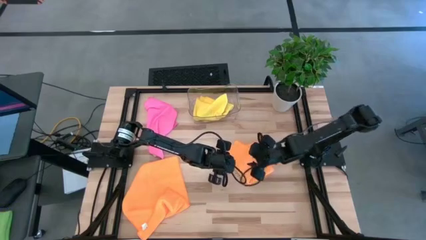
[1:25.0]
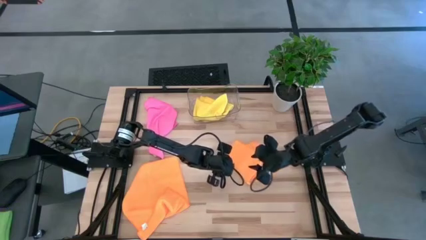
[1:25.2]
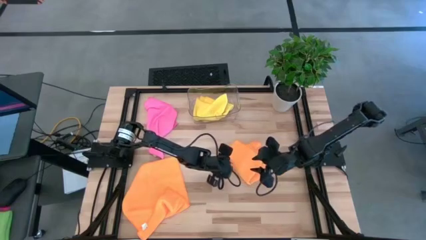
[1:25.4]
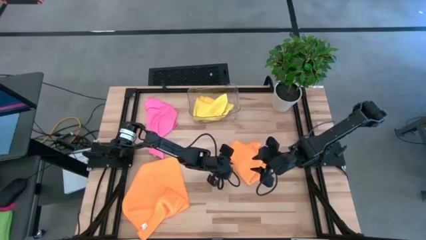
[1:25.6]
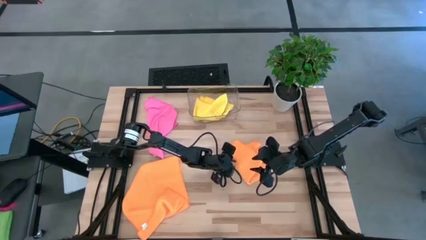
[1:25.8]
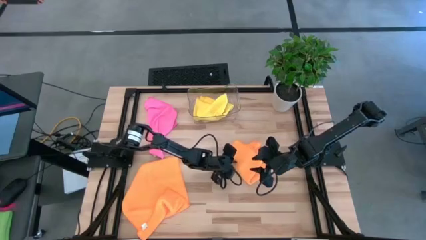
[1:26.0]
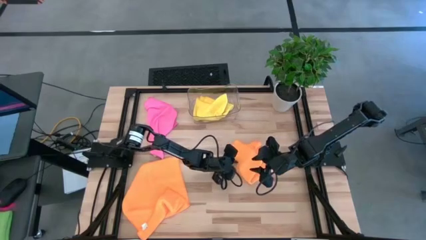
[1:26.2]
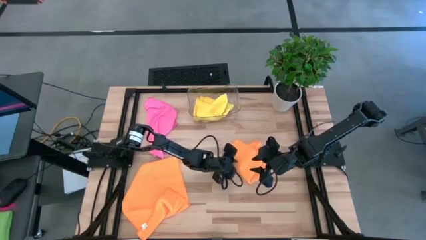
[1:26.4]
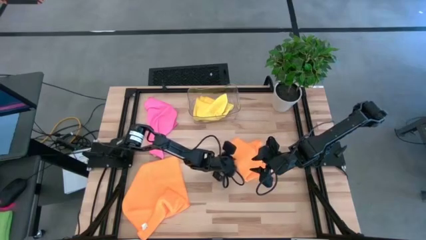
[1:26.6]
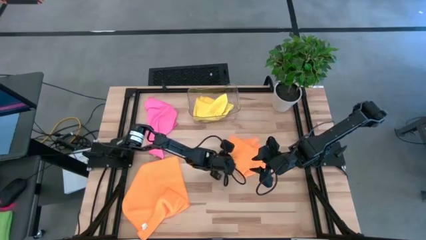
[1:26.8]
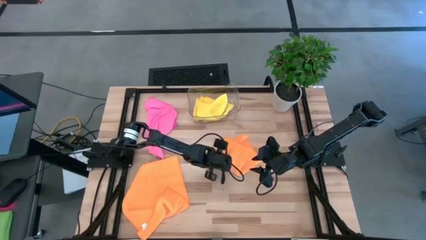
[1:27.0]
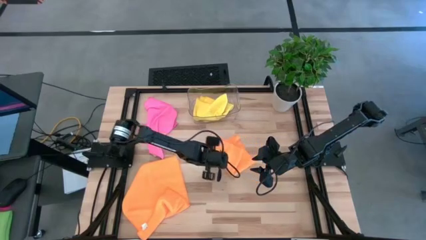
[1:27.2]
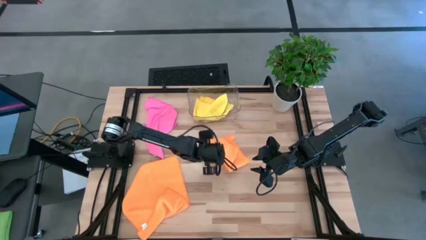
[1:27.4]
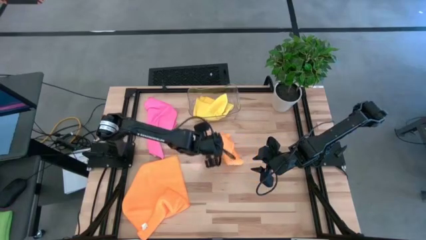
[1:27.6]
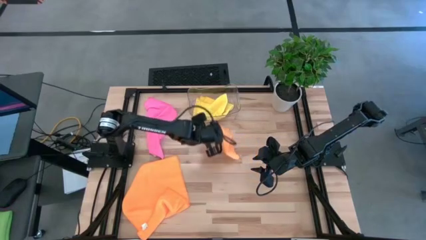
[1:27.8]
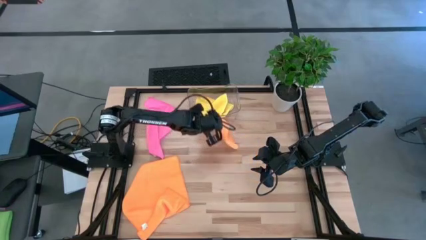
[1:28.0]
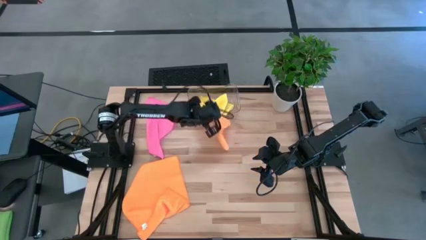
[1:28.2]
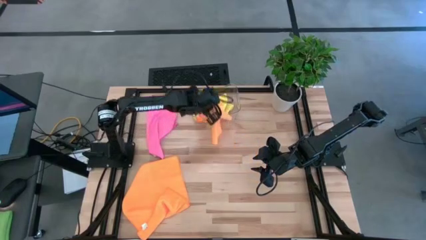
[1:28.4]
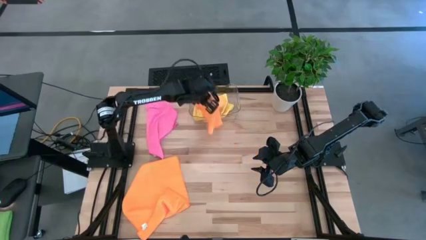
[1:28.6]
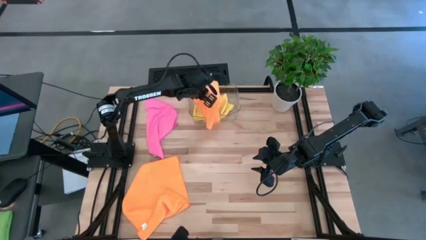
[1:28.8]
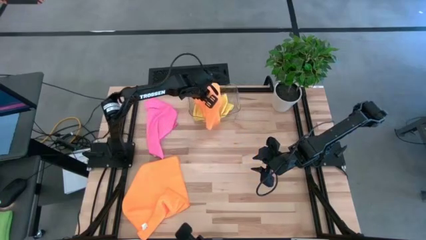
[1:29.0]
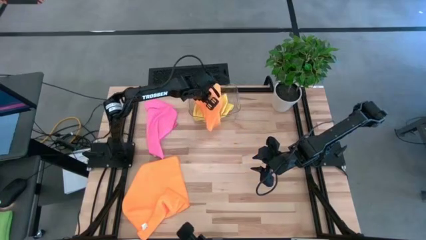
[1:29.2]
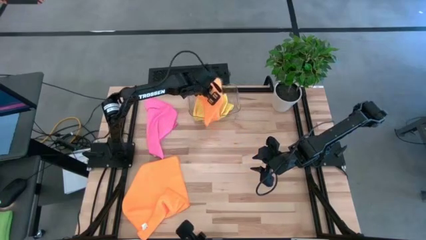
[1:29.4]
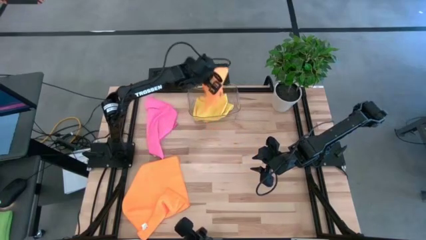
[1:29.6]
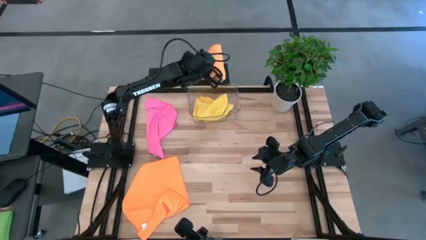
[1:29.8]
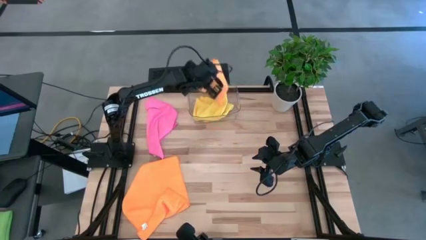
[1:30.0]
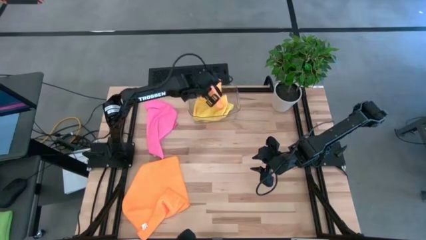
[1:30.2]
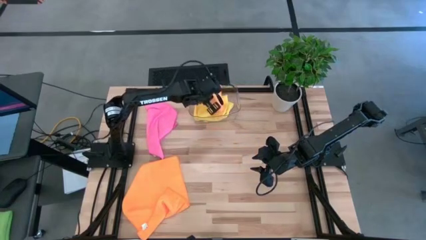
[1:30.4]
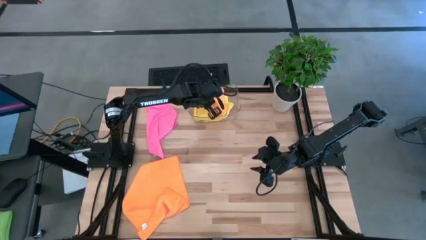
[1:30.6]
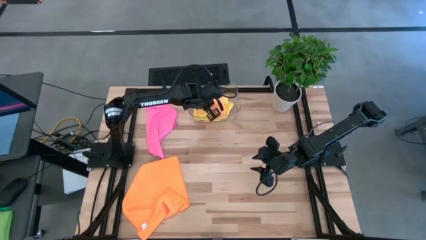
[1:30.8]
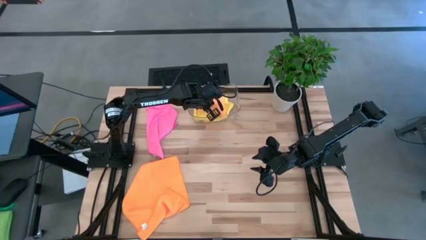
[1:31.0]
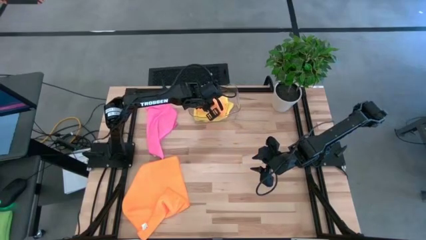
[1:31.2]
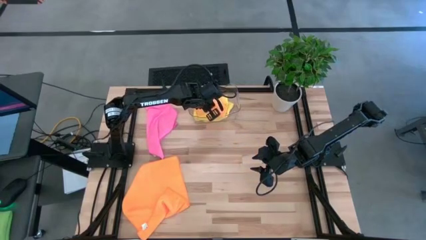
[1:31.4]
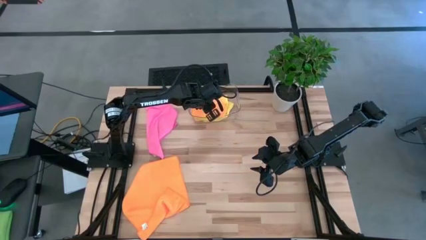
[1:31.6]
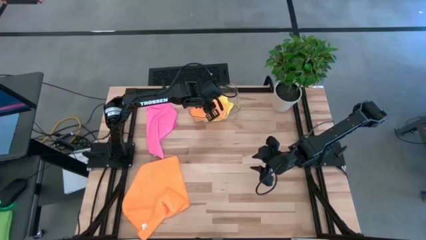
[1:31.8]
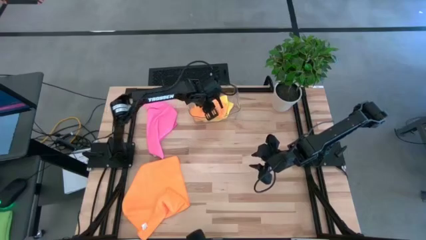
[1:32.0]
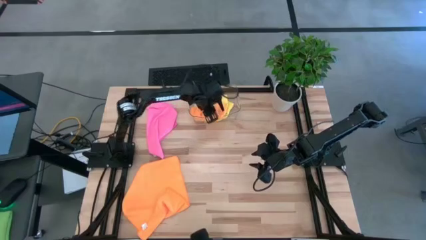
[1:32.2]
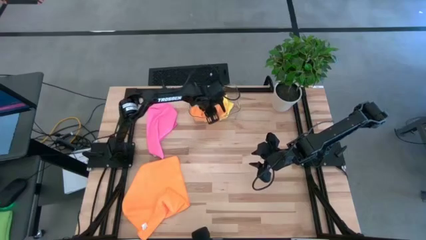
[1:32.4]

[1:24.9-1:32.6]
Task: Fold microfiber towels
Put the folded right orange towel into the transparent bin

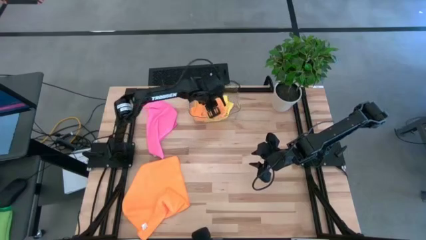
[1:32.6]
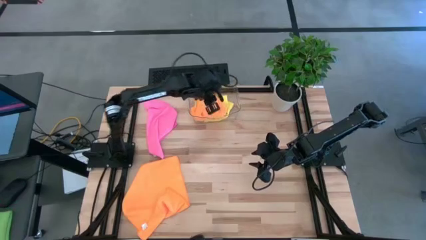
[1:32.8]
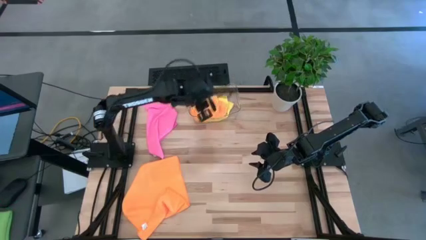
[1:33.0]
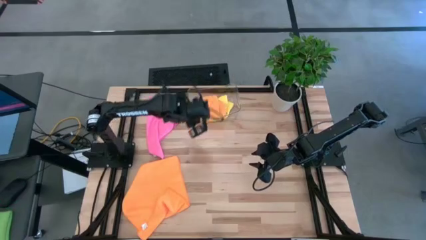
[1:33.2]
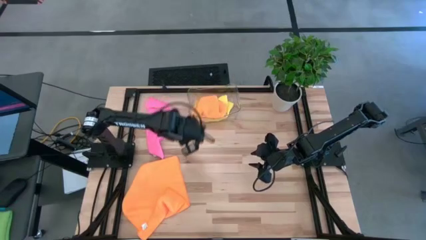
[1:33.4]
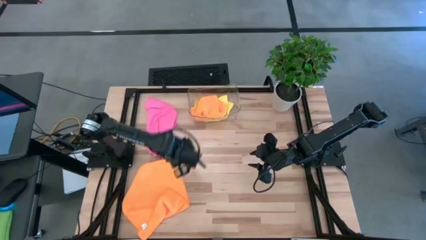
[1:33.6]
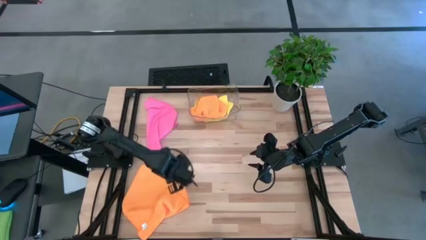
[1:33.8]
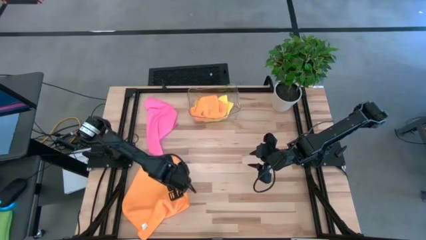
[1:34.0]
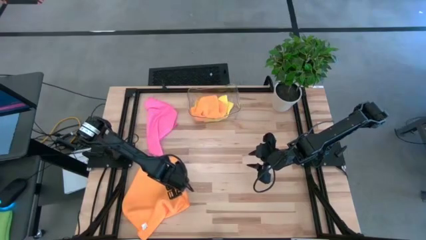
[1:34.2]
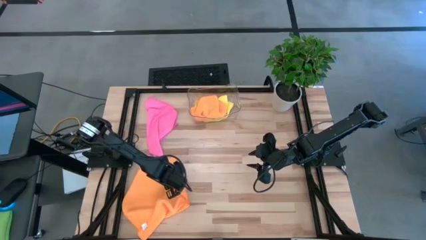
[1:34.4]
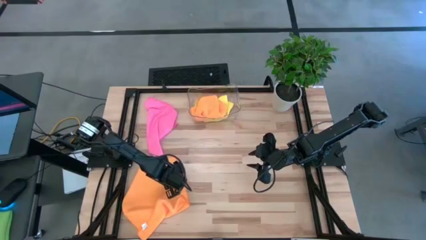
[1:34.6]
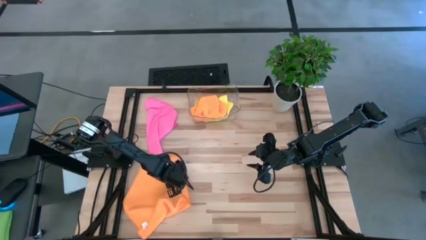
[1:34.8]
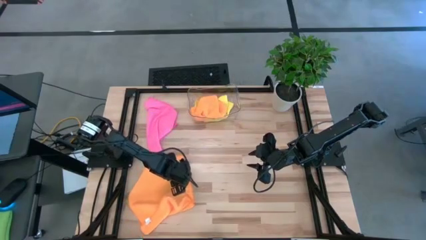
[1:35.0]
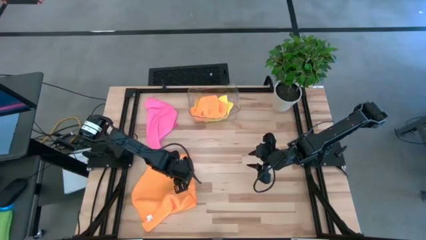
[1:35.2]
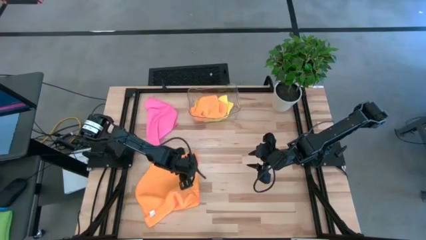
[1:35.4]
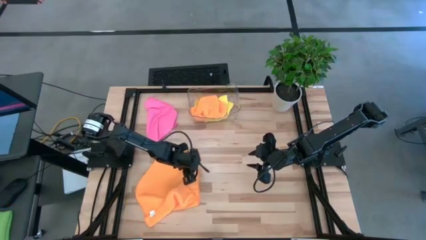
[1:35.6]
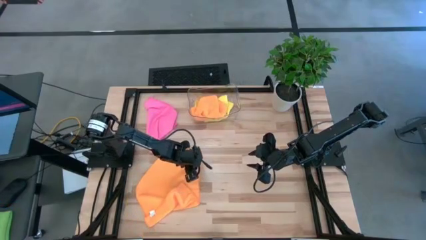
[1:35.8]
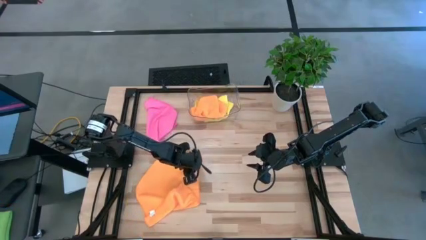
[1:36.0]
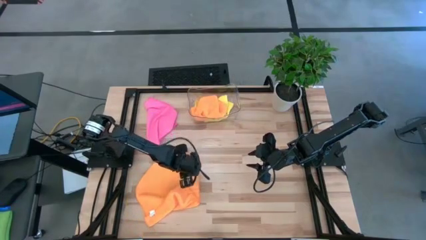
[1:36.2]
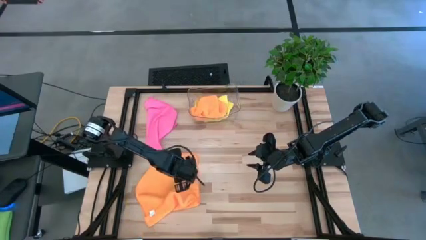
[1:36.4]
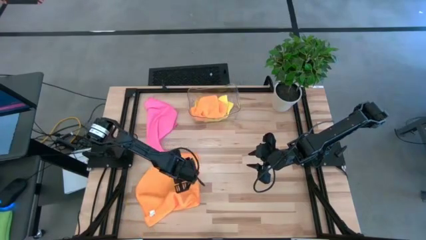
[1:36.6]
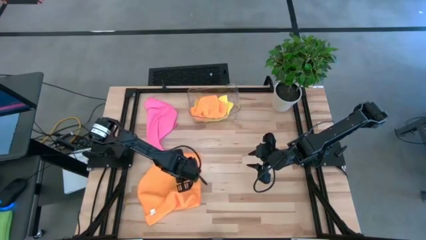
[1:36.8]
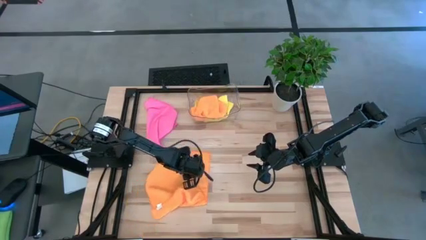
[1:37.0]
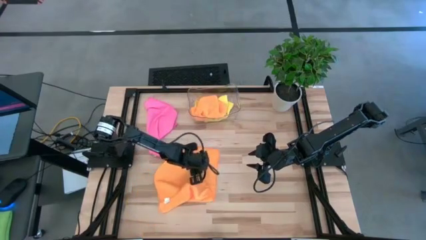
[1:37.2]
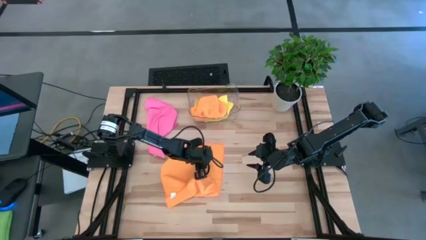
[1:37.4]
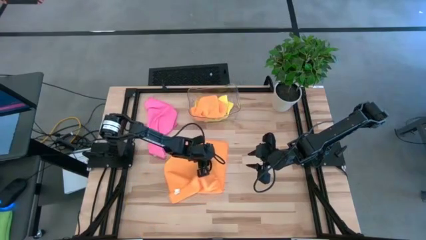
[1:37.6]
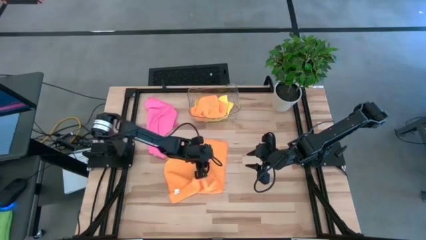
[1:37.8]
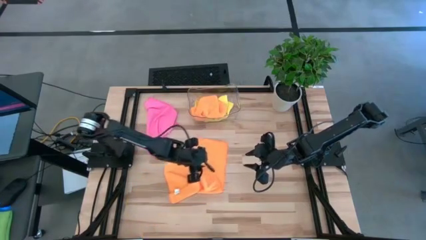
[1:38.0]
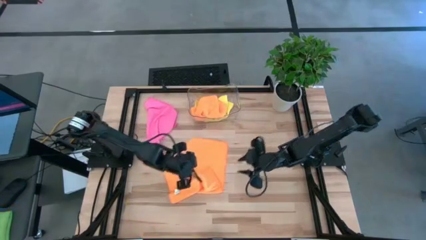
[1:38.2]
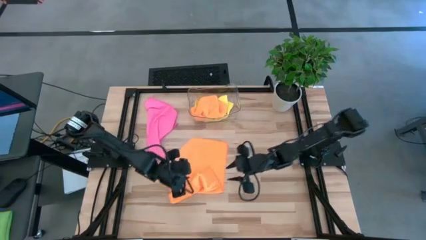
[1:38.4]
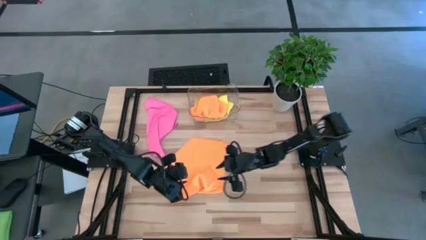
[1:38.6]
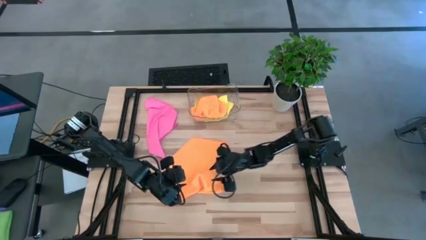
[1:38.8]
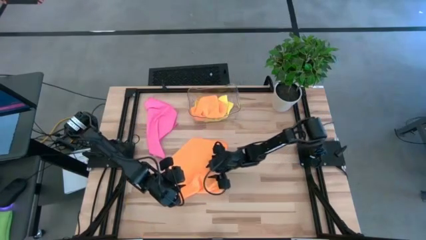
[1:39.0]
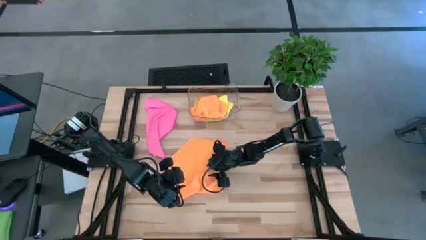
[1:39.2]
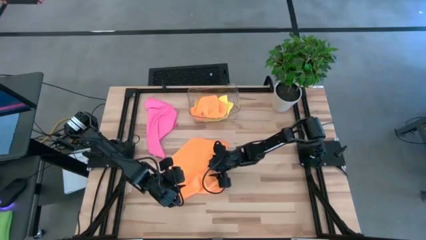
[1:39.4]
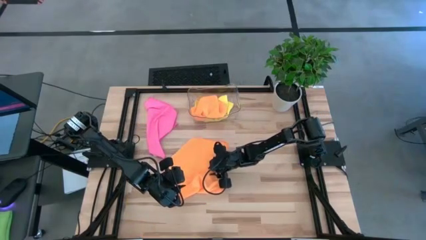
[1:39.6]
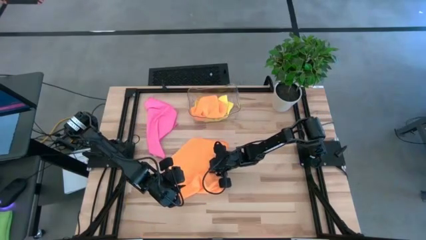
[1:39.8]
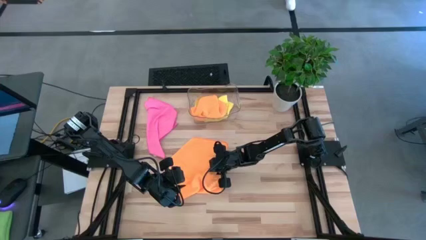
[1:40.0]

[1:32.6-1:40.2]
Fold the orange towel

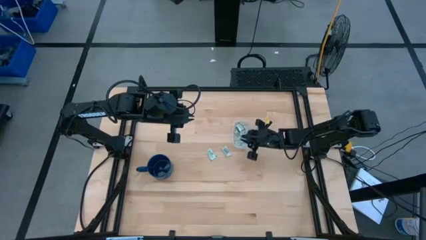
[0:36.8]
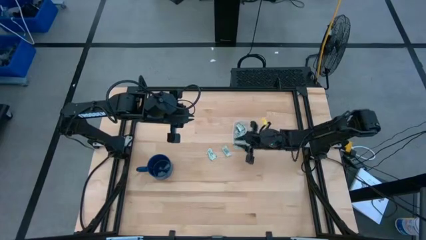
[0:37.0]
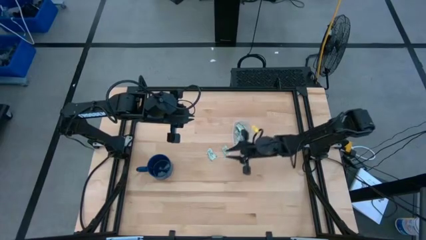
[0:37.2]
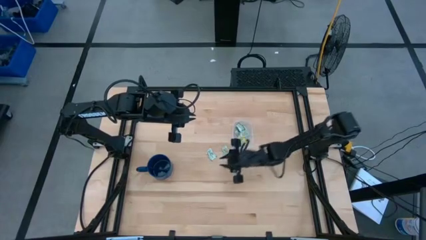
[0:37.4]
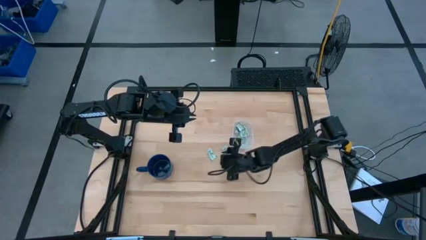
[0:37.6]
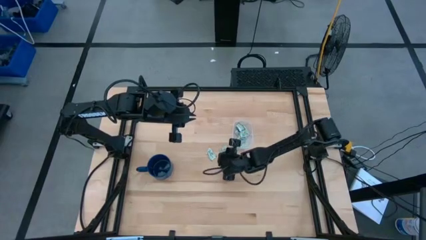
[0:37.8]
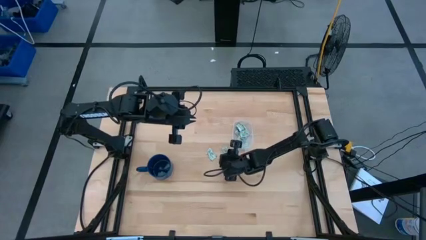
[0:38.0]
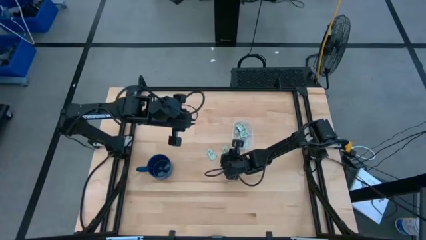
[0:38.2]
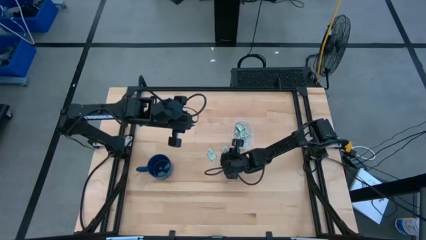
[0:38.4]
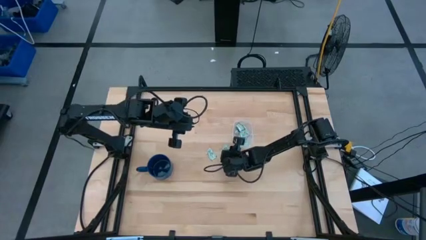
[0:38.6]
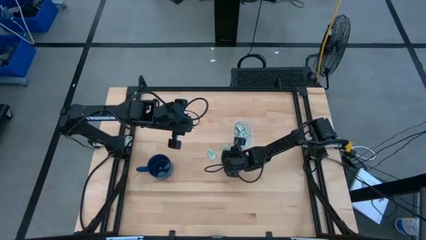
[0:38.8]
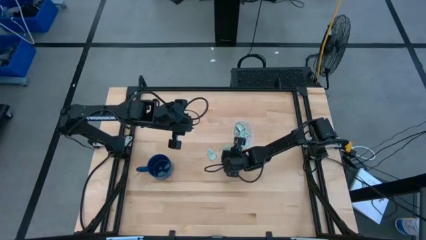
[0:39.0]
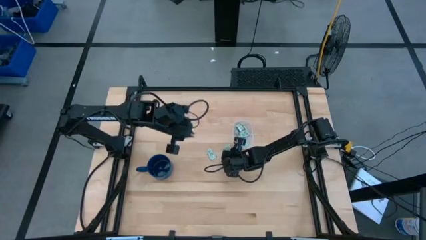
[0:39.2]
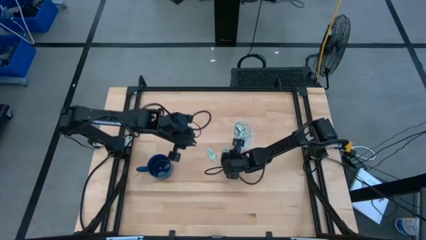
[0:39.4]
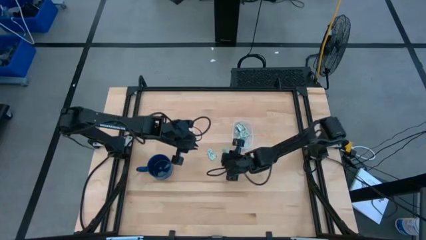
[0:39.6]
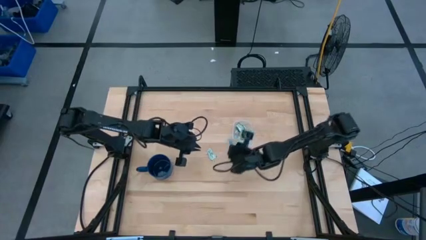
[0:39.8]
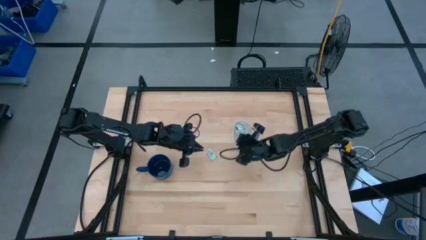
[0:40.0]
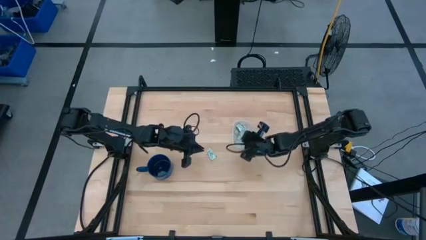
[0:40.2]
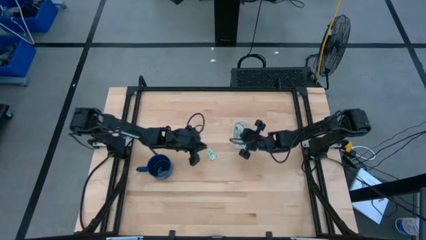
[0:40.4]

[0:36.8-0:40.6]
Task: Pick and place Stevia / Truvia into bins
Put the light green stevia packet into the transparent container
